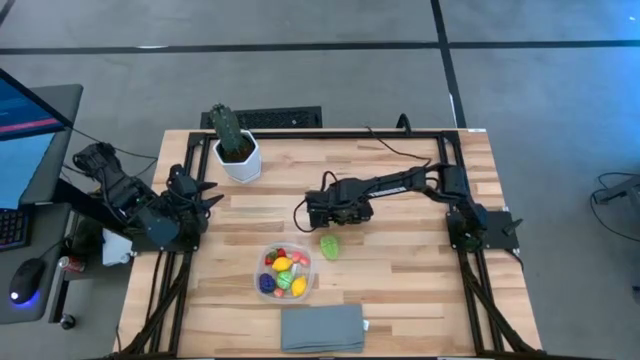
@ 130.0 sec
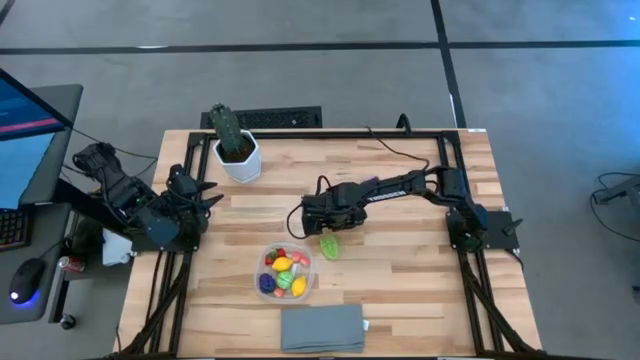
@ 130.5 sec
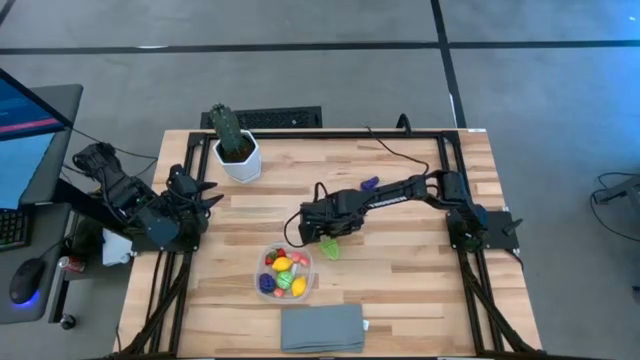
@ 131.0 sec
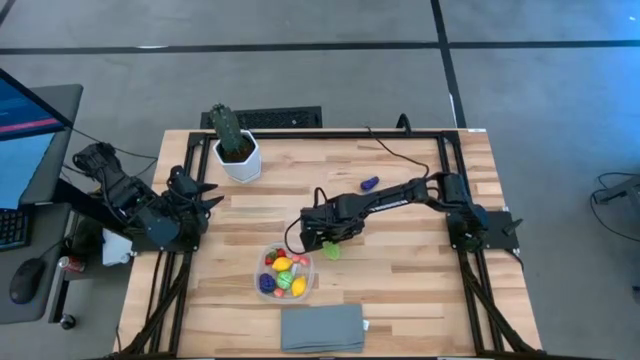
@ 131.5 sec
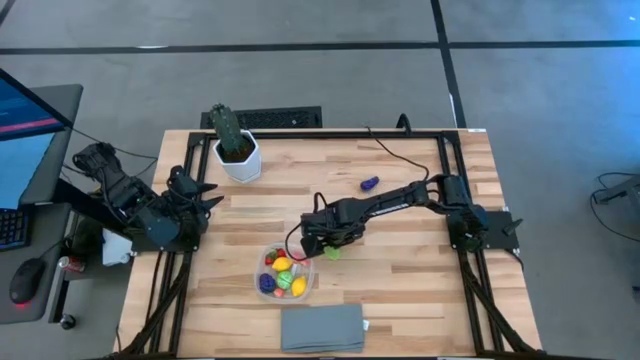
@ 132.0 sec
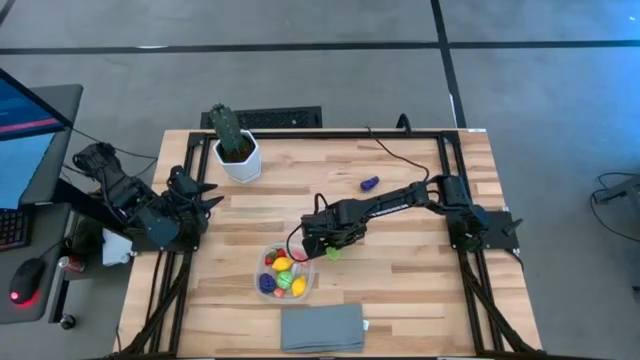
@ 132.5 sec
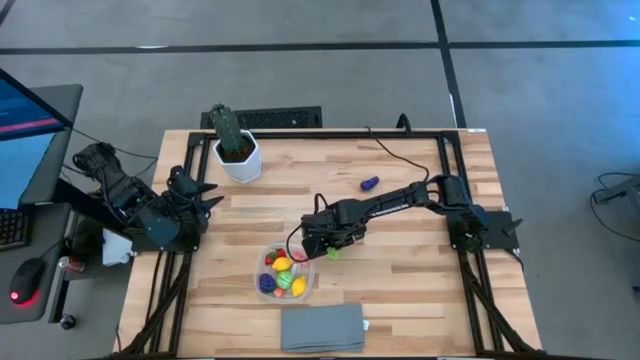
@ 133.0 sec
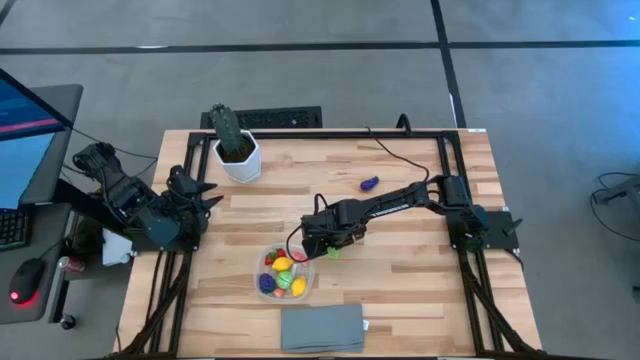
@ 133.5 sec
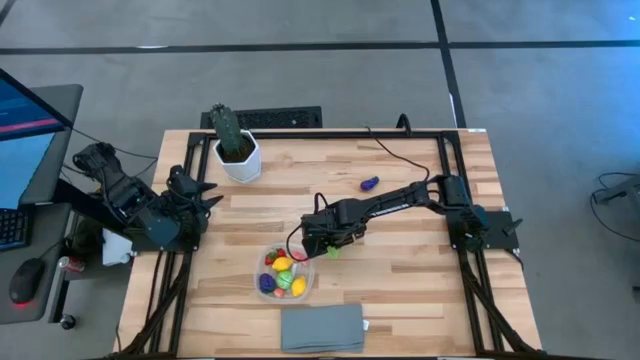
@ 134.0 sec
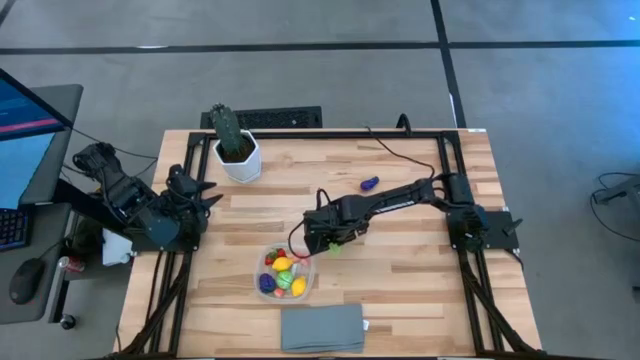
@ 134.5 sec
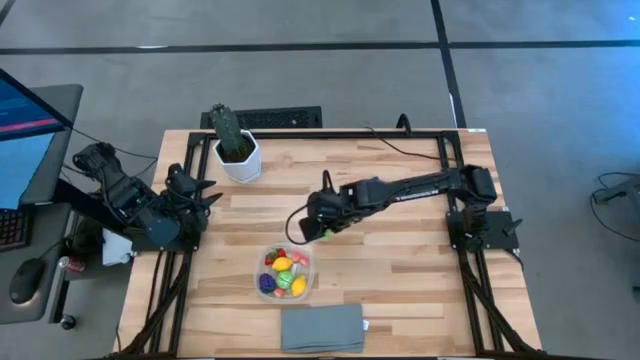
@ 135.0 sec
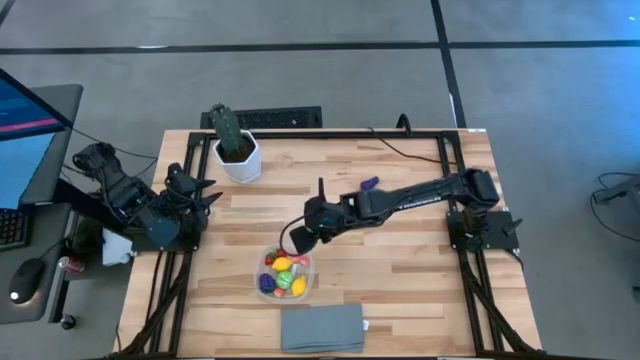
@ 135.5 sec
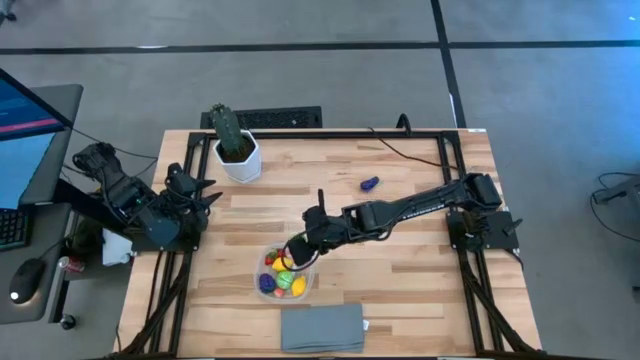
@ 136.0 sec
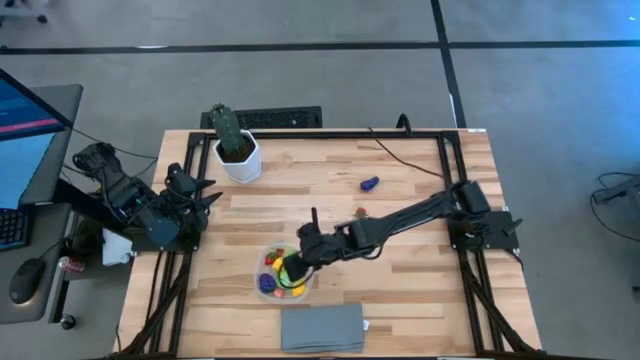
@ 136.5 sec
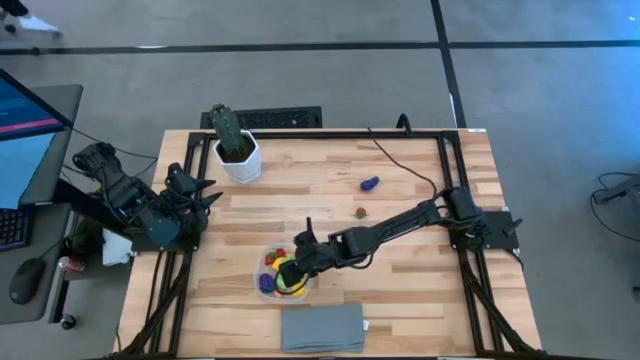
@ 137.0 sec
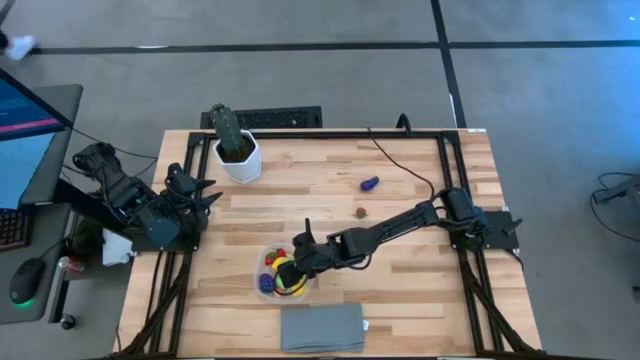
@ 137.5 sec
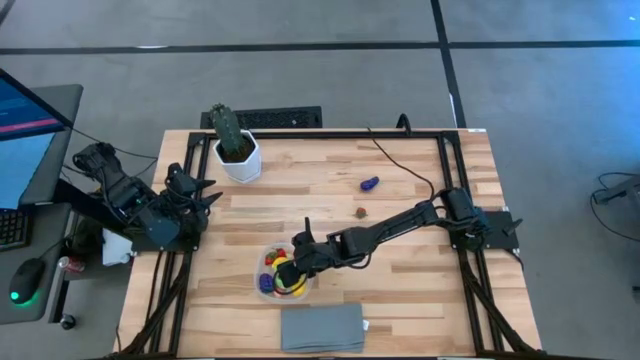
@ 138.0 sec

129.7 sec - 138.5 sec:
Task: Pick and placing Produce into tupperware
Put the starfruit into the transparent bin

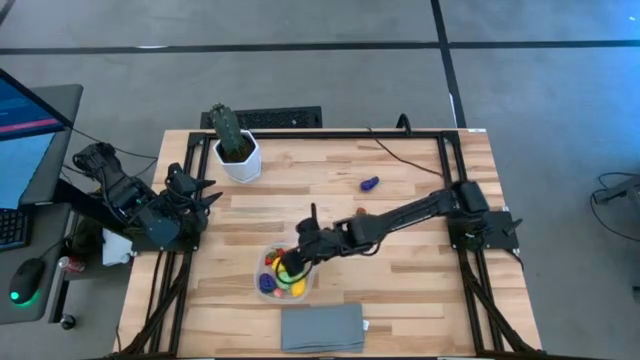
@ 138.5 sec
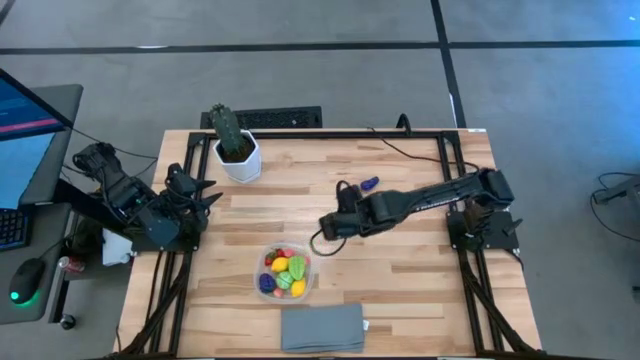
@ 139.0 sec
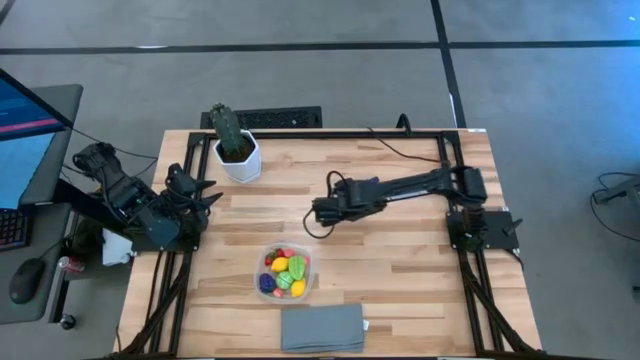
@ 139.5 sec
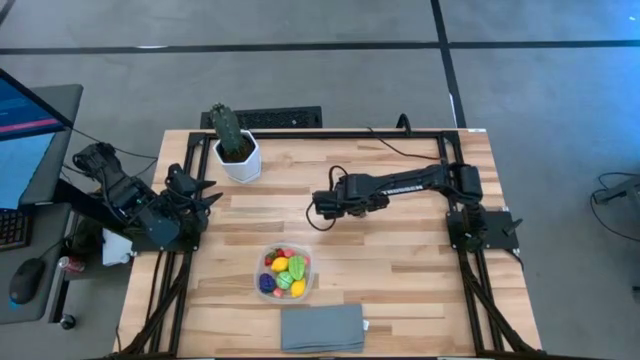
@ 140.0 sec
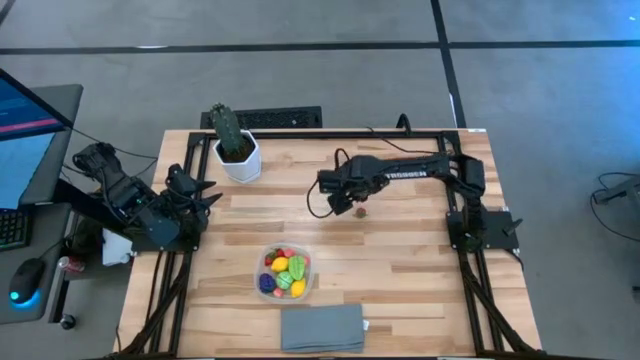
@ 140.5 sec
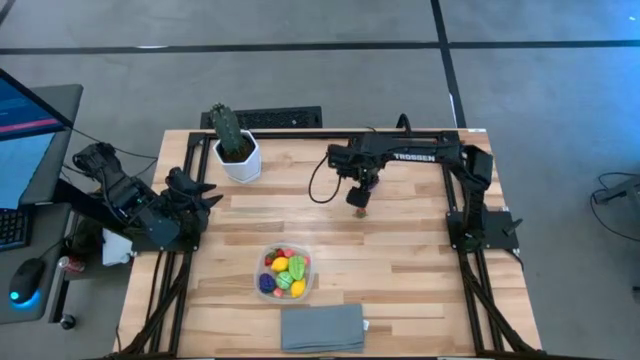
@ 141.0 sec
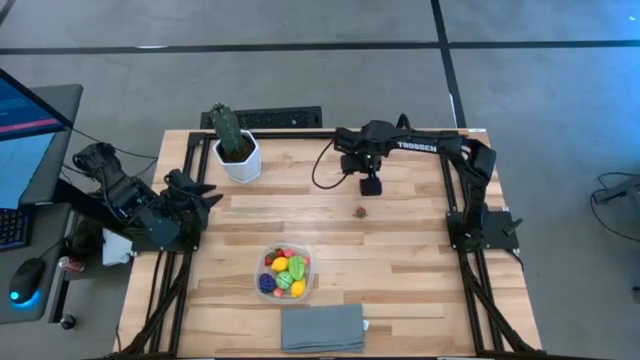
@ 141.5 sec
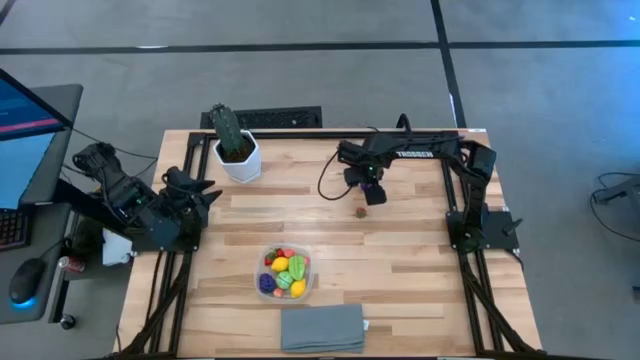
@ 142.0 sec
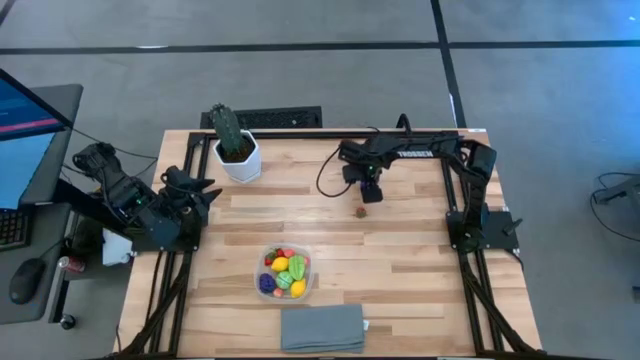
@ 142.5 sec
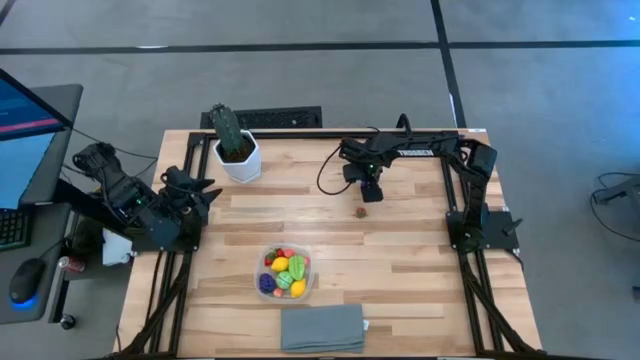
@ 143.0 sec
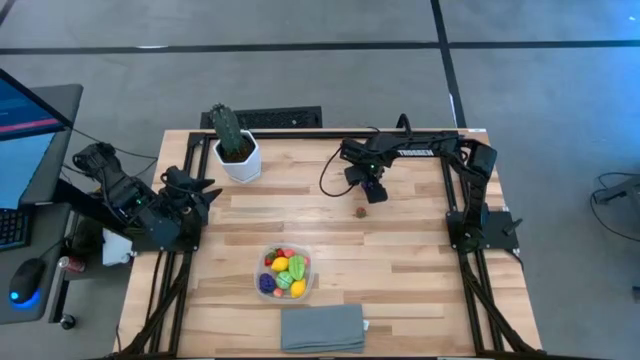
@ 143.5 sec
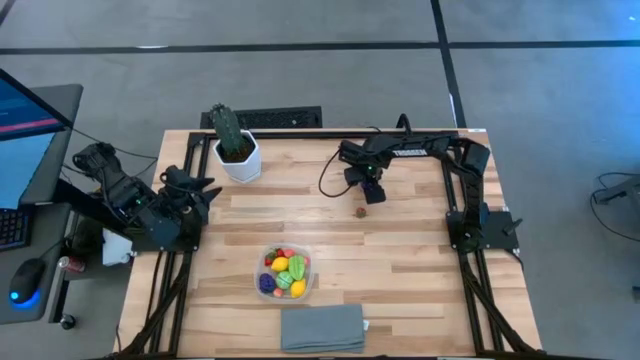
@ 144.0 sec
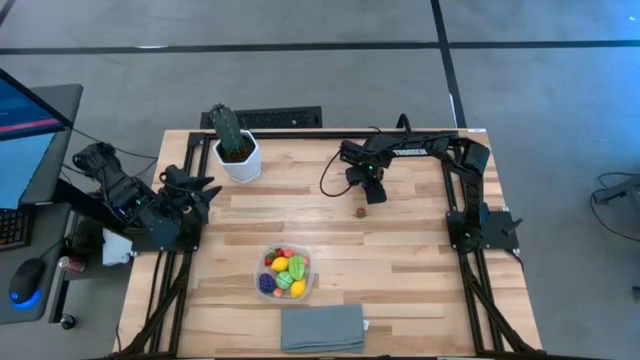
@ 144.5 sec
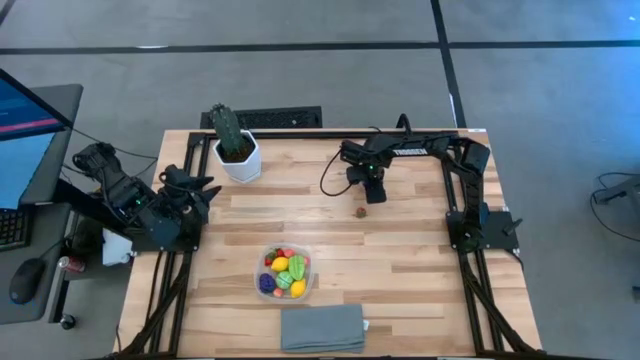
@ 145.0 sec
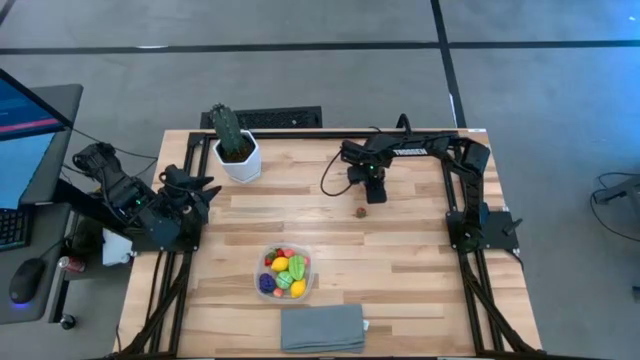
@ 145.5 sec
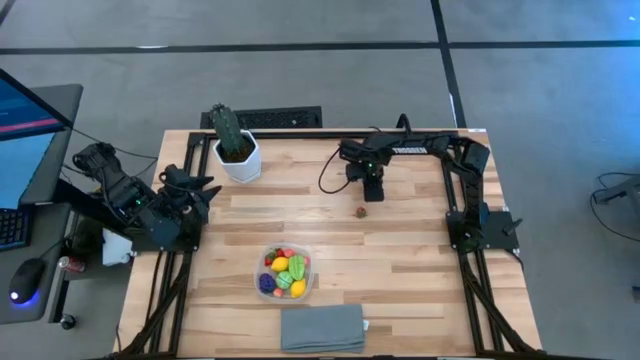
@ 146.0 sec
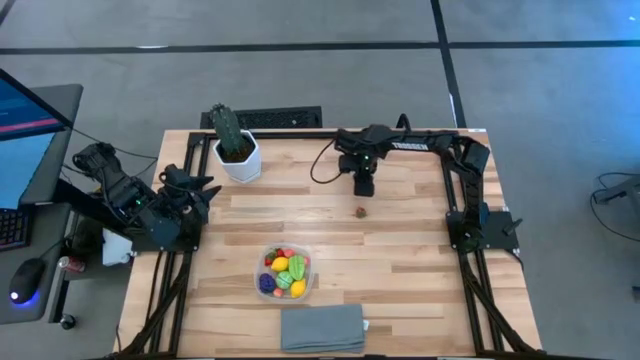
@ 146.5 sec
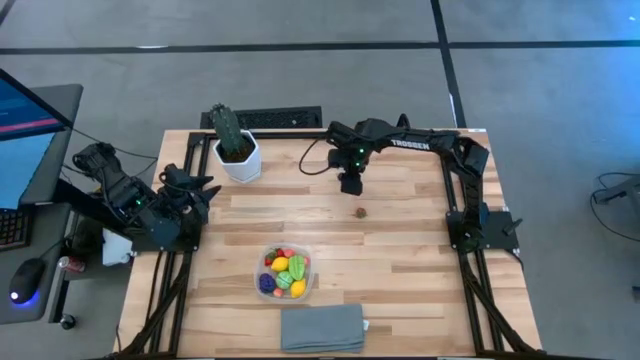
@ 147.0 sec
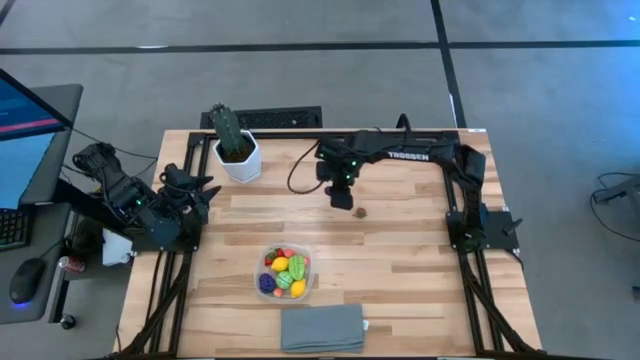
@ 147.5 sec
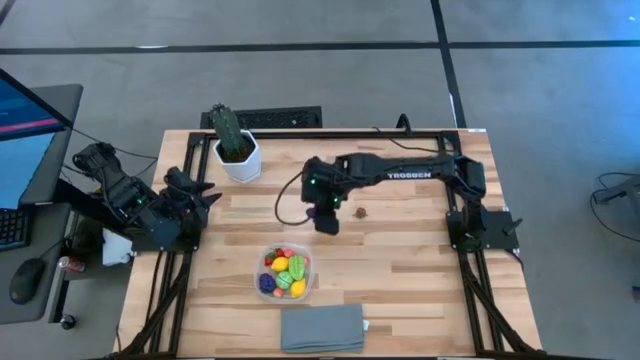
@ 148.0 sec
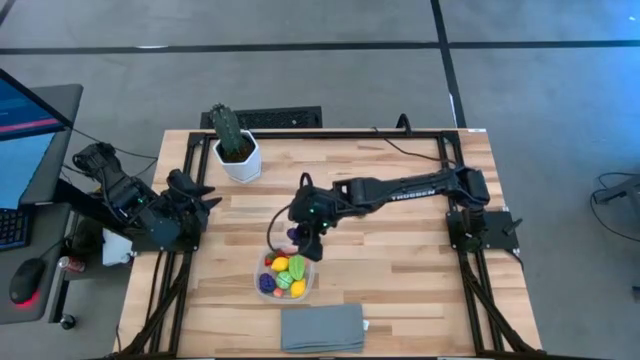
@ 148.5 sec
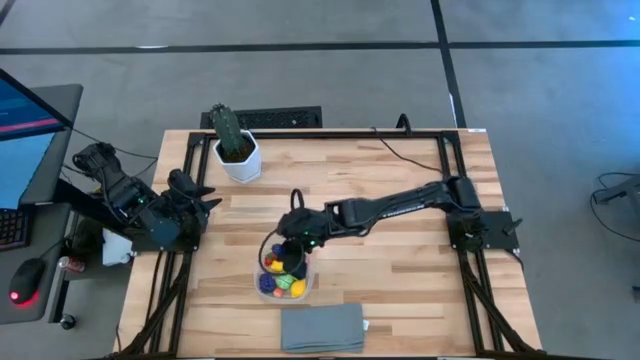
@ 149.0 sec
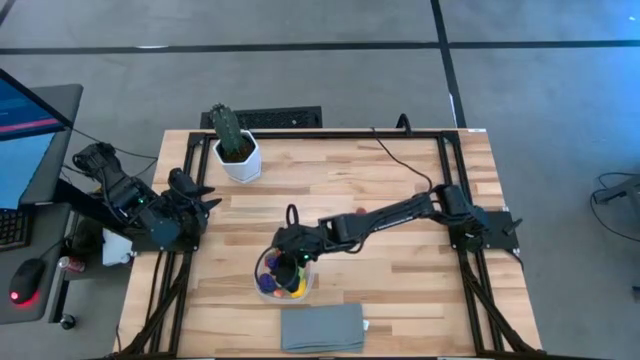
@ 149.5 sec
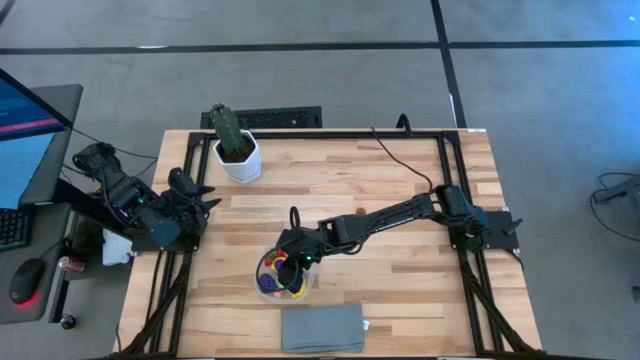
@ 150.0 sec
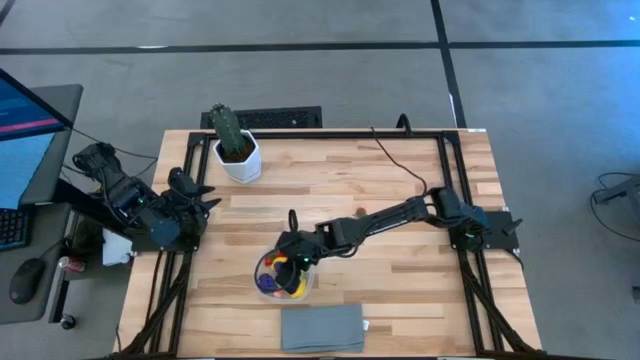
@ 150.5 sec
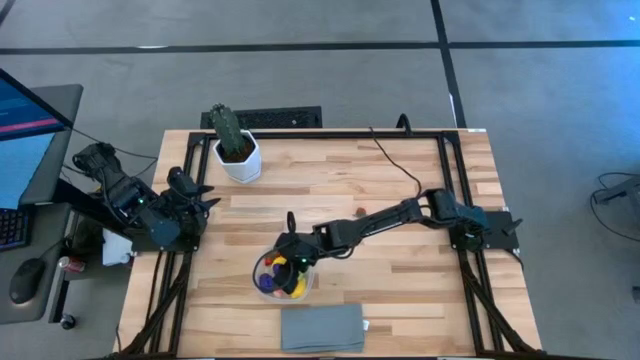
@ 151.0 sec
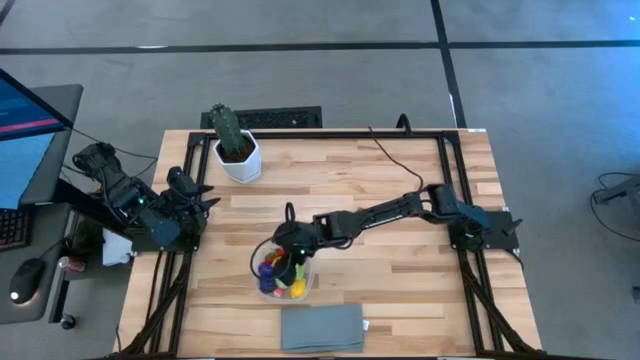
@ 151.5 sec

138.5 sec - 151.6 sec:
Put the eggplant into the transparent bin
